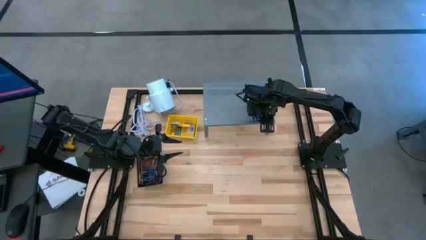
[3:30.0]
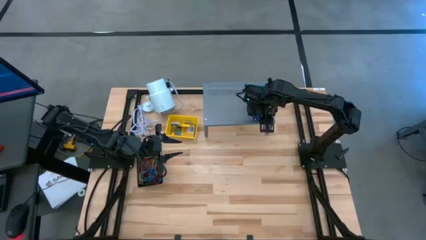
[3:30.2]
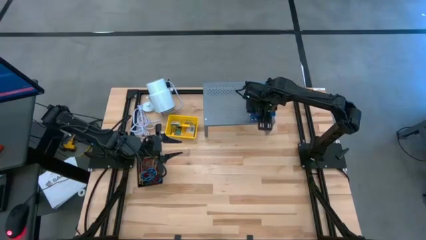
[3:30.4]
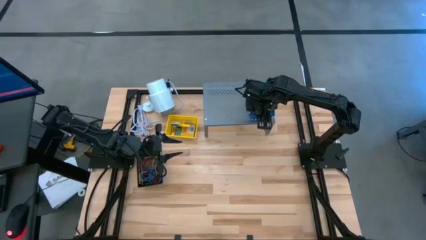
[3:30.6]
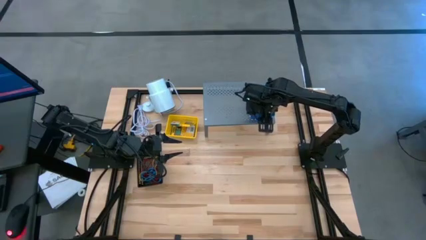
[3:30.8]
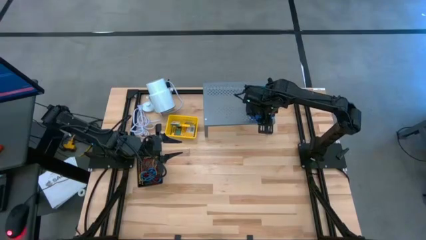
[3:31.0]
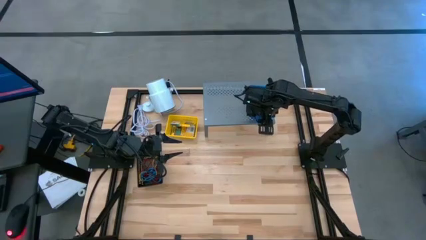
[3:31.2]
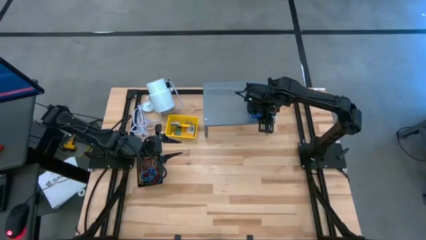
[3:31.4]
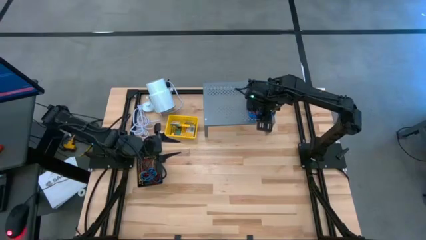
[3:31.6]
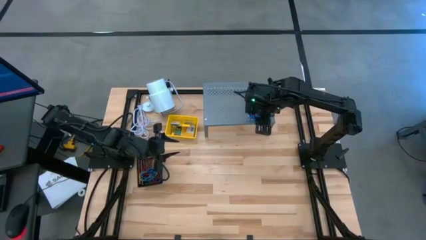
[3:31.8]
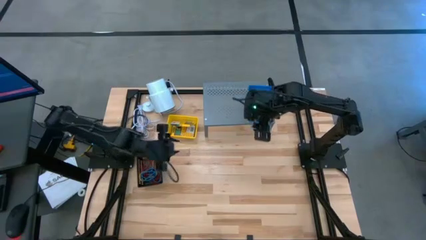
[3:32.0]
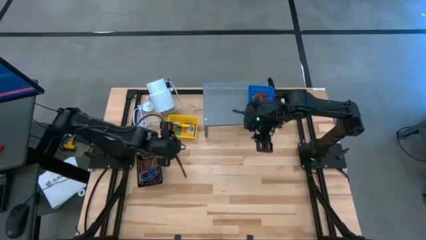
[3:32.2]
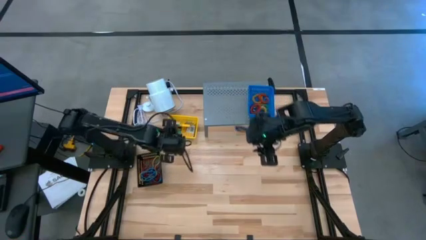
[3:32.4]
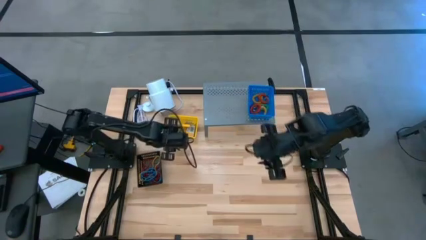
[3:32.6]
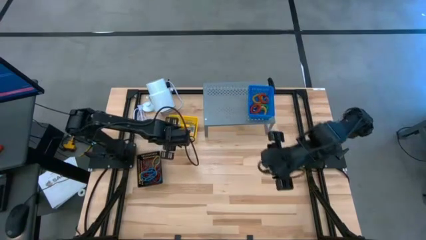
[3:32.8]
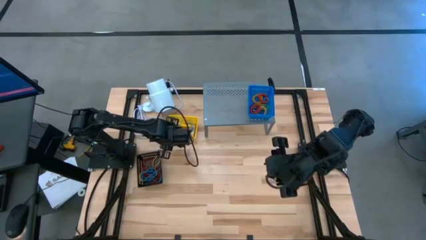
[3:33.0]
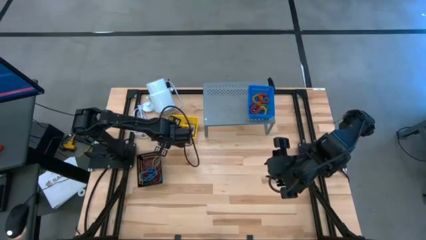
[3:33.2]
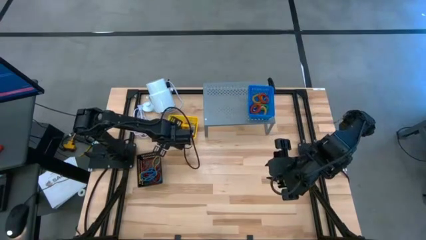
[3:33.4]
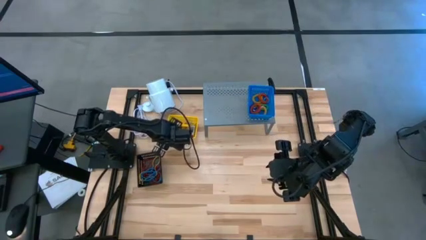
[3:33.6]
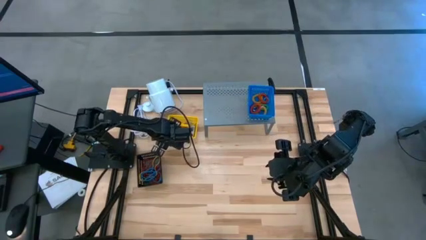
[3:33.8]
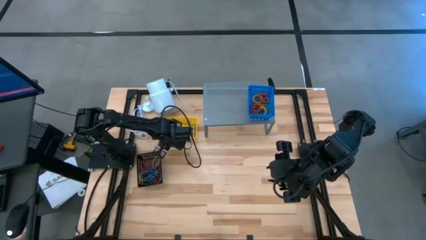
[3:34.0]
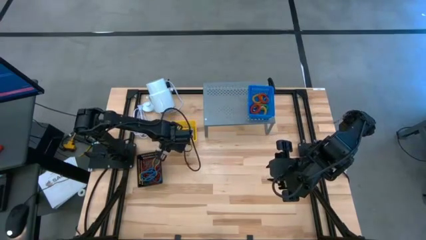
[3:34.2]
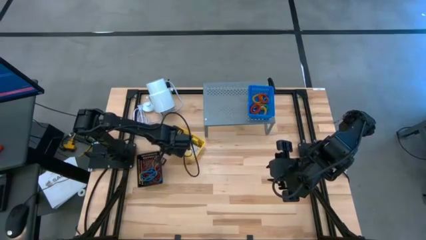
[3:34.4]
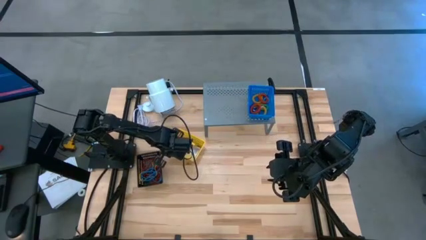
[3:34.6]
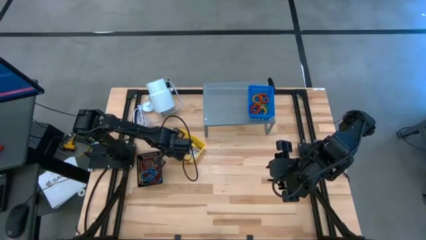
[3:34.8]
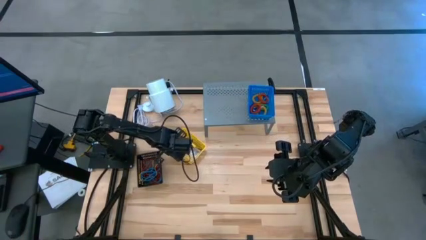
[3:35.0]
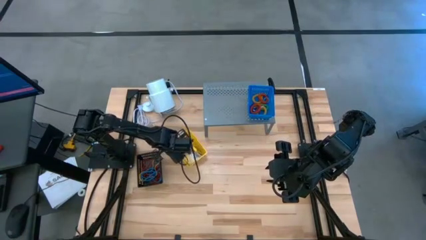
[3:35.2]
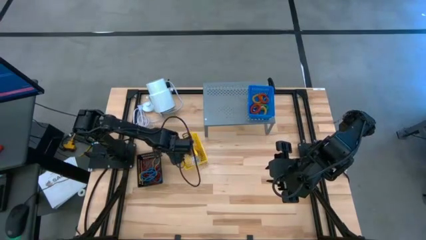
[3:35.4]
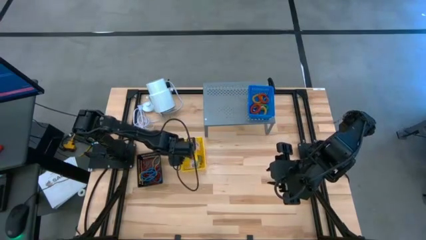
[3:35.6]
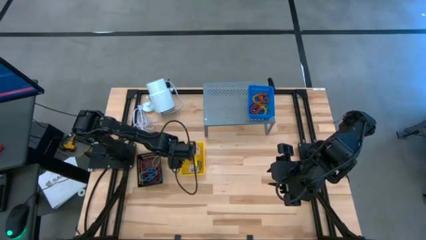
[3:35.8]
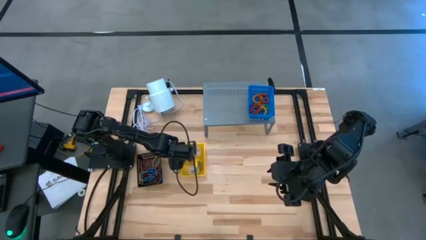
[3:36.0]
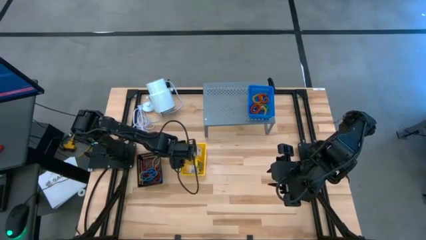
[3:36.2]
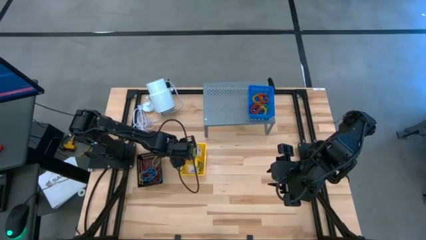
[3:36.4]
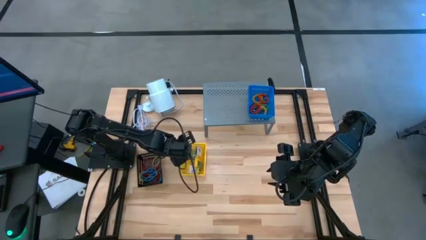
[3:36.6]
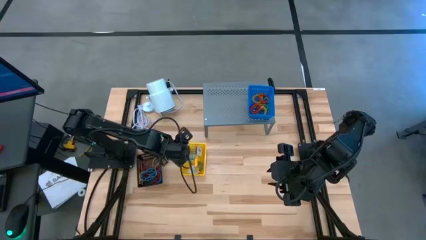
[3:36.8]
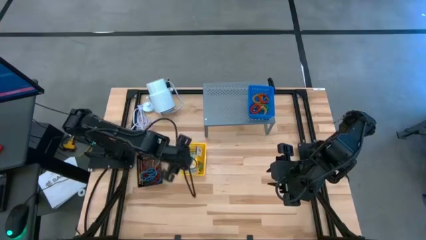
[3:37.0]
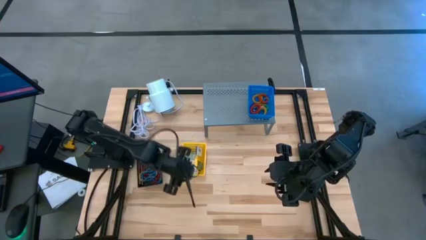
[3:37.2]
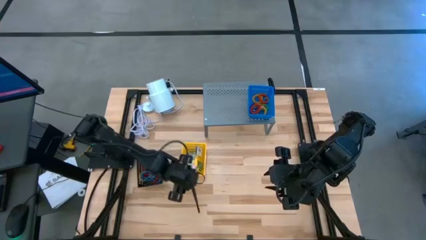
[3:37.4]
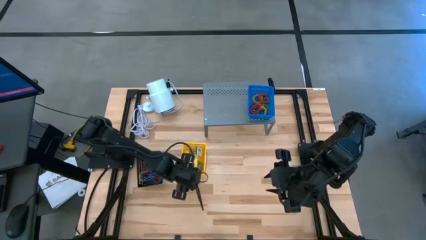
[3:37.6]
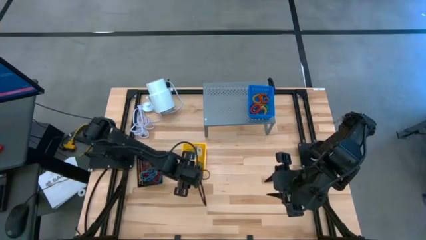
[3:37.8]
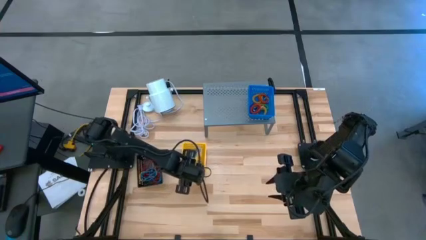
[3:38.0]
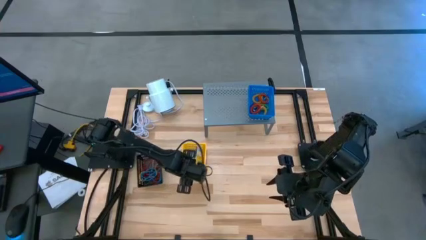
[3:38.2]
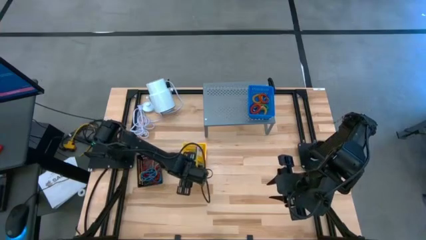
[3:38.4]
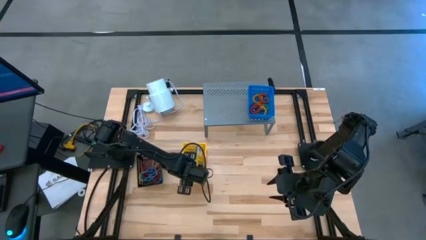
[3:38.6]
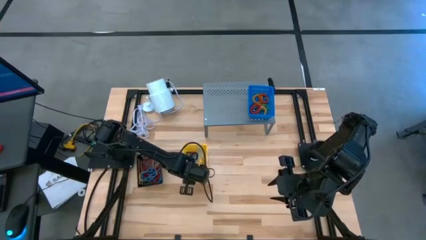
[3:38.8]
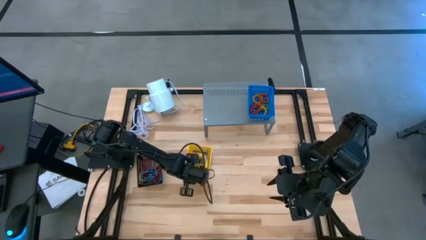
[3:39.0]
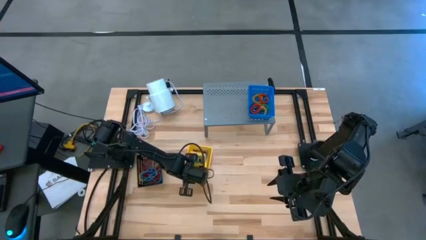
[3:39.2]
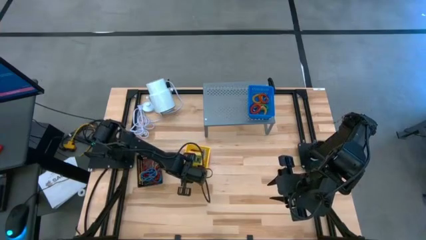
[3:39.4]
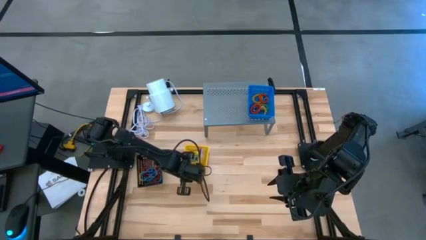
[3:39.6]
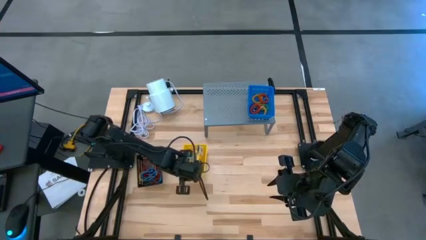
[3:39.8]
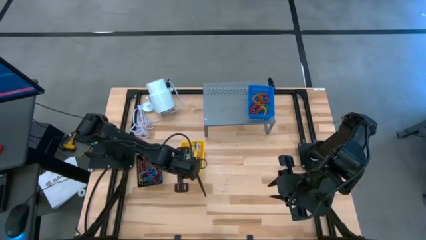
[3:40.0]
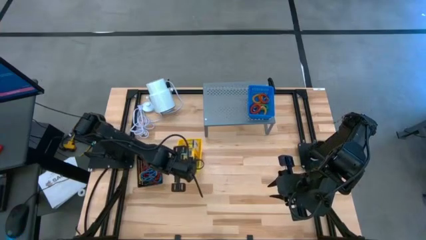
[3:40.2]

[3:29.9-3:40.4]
Task: Pick & Place Office Desk Supplies
Put the yellow bin on the shelf
